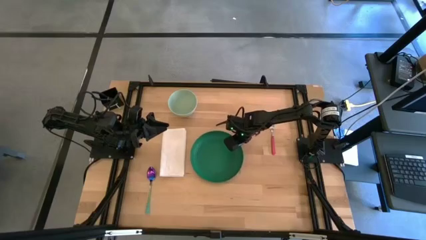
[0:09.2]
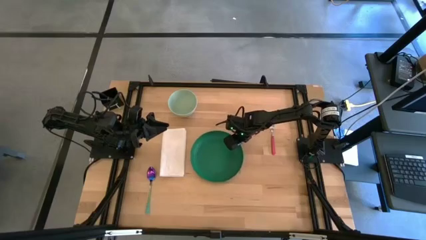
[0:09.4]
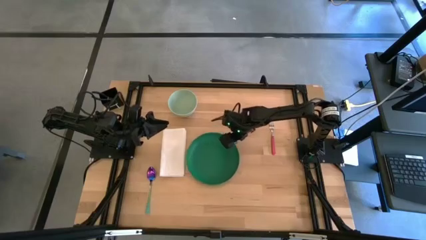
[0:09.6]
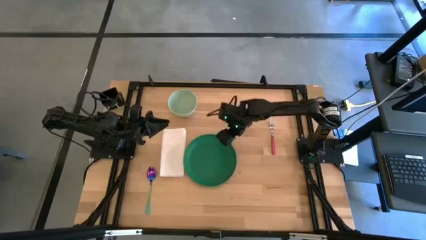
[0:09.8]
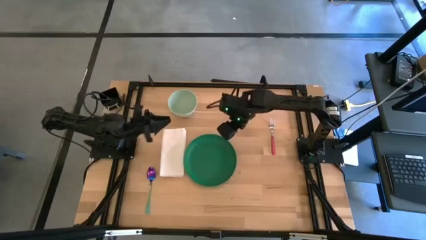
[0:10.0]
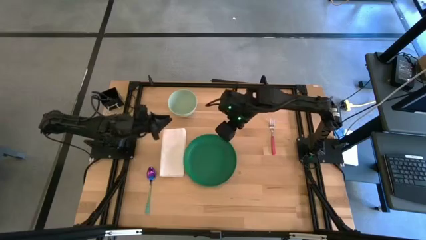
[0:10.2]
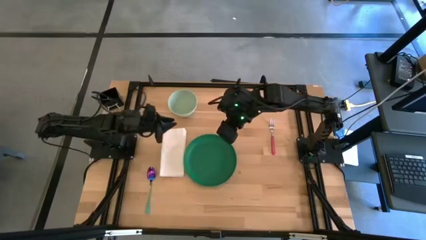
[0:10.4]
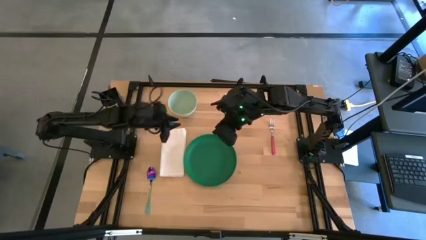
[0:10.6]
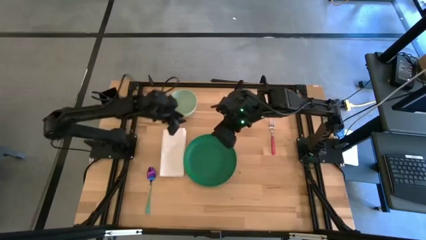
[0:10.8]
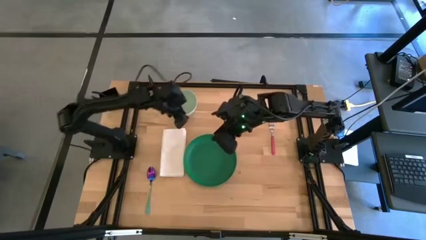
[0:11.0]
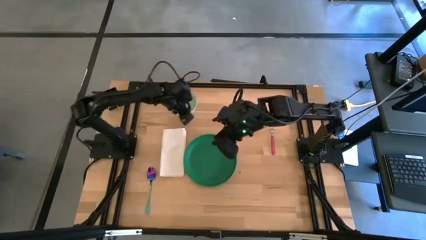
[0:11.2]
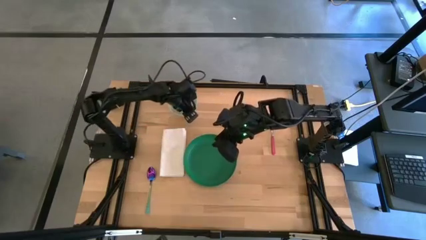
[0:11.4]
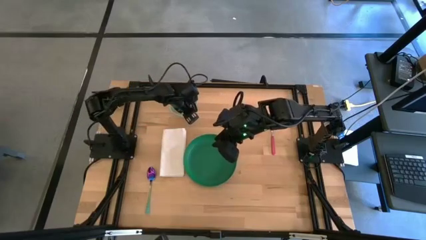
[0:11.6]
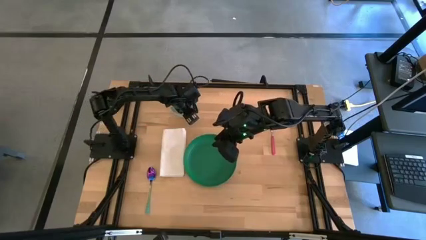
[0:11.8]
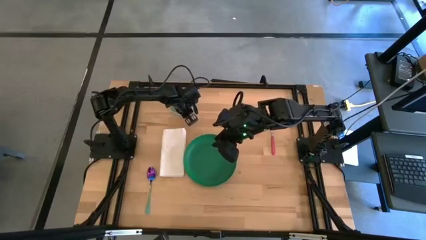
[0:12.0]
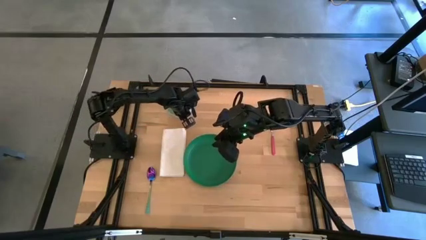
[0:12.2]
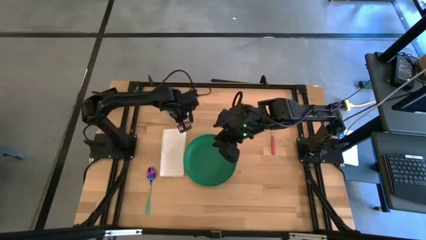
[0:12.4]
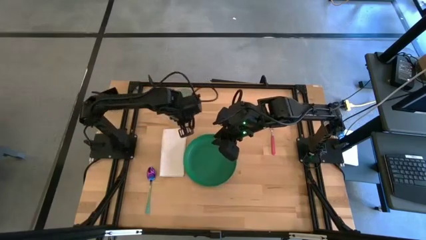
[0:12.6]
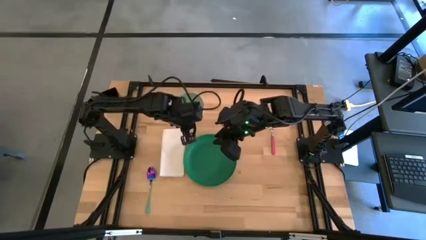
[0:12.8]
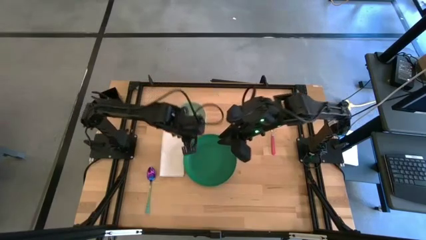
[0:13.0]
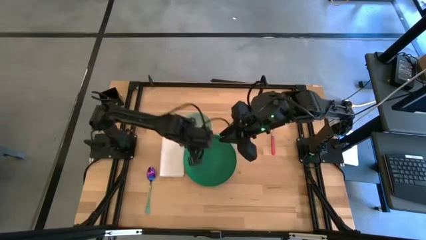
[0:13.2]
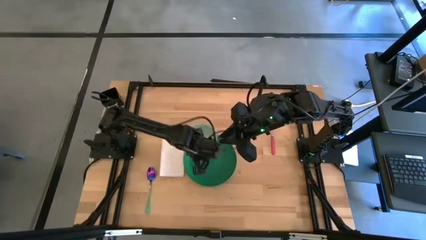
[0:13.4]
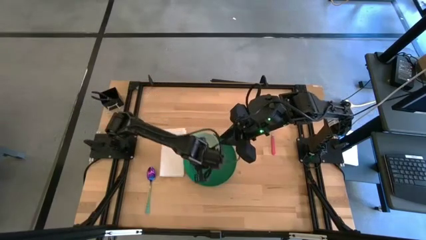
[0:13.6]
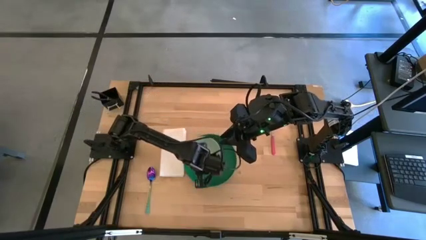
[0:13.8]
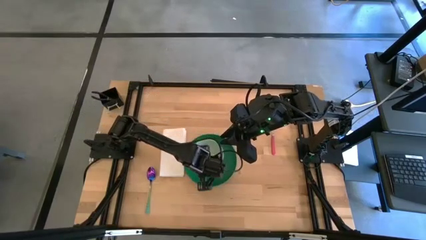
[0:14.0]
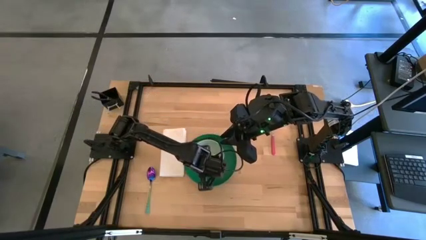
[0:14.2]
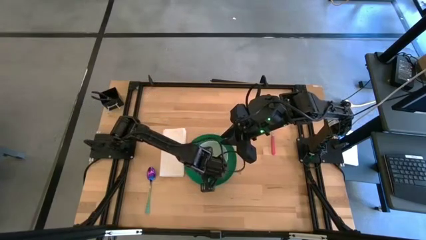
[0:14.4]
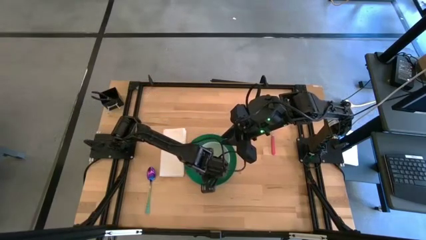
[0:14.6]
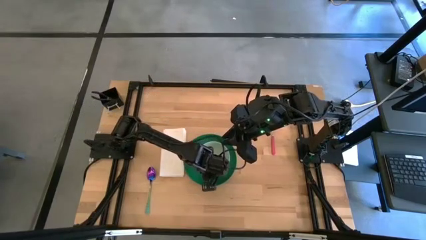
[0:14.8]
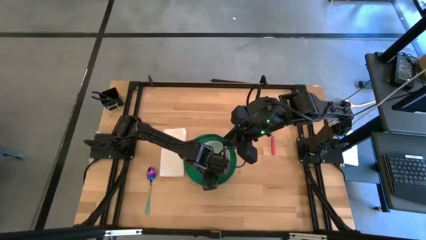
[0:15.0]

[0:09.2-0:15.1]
Task: Set table place
Put the blue bowl on top of the green plate

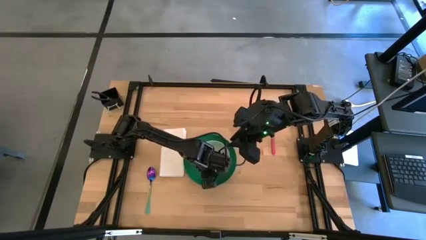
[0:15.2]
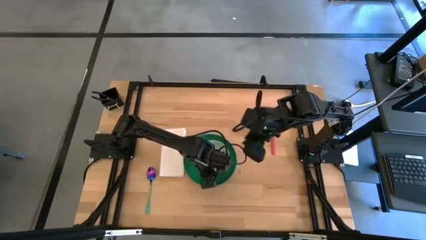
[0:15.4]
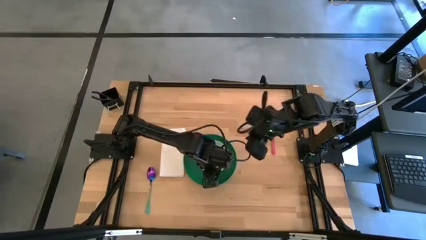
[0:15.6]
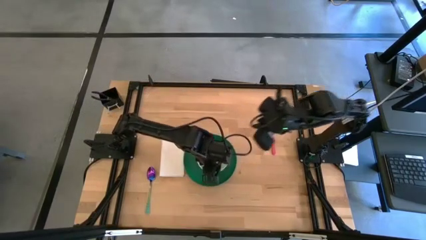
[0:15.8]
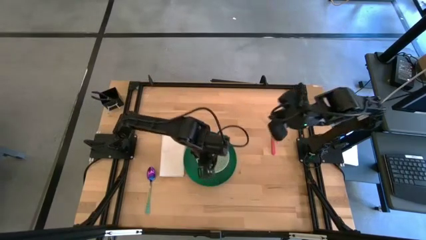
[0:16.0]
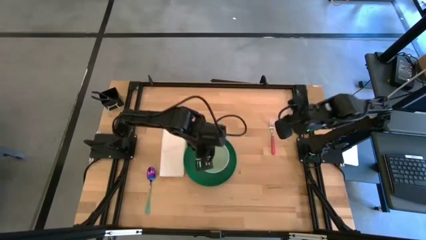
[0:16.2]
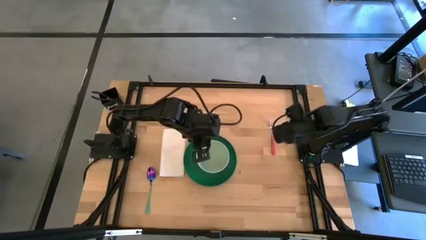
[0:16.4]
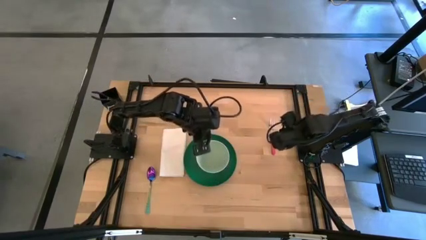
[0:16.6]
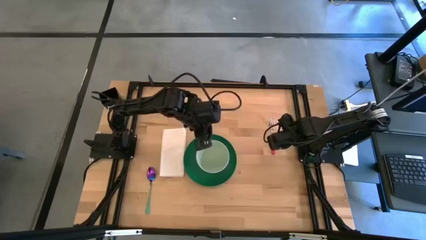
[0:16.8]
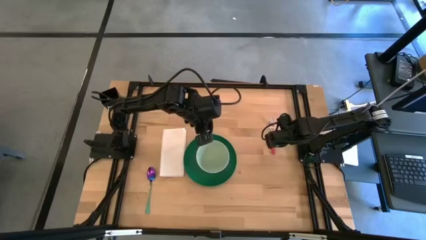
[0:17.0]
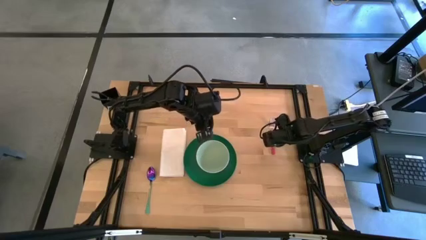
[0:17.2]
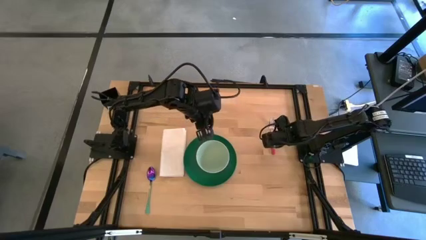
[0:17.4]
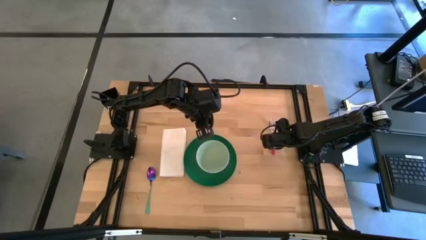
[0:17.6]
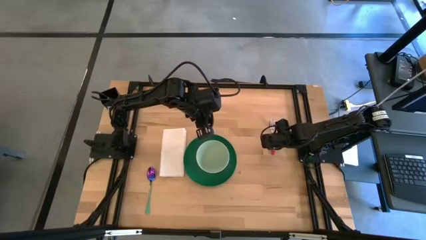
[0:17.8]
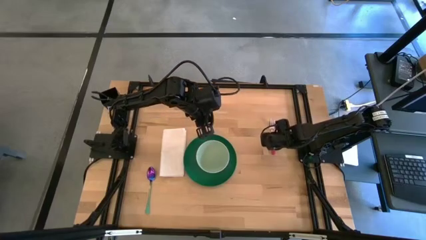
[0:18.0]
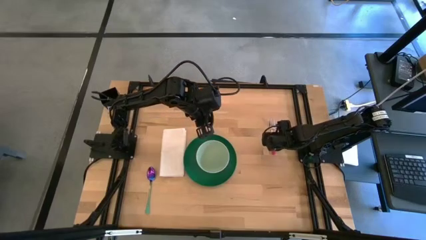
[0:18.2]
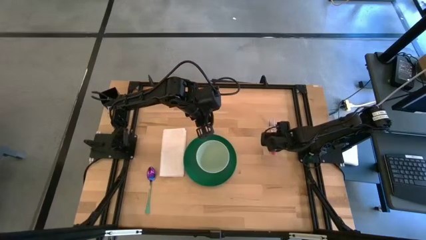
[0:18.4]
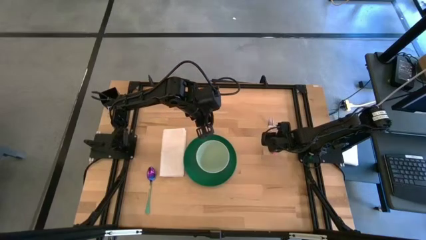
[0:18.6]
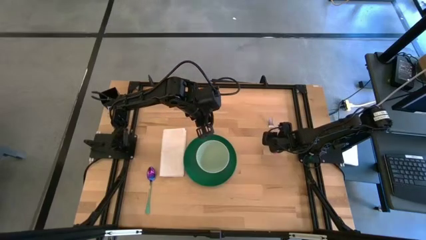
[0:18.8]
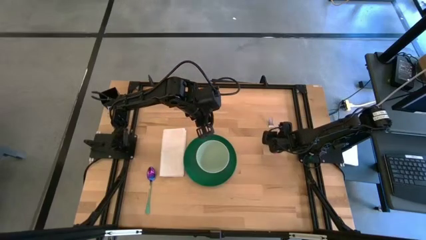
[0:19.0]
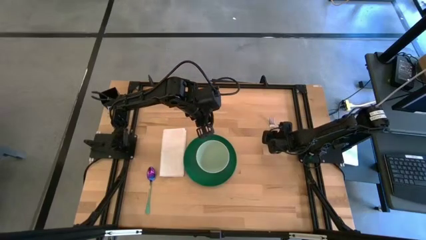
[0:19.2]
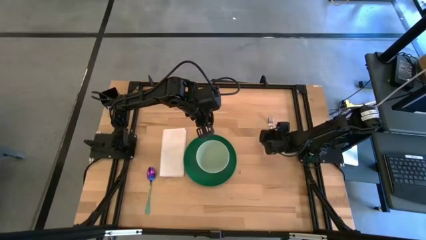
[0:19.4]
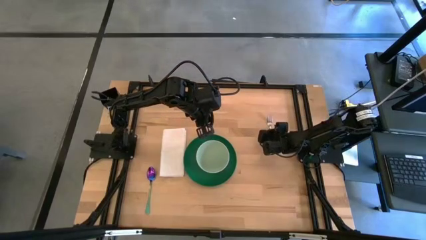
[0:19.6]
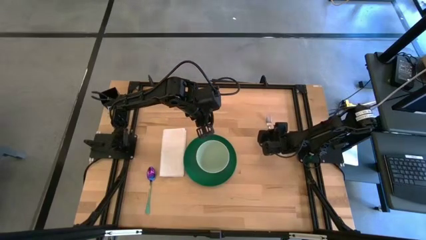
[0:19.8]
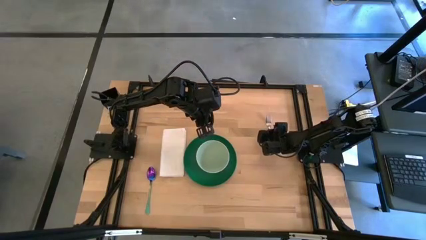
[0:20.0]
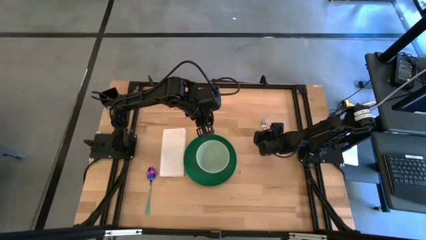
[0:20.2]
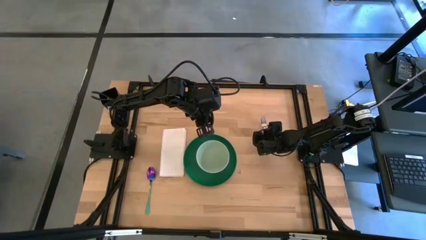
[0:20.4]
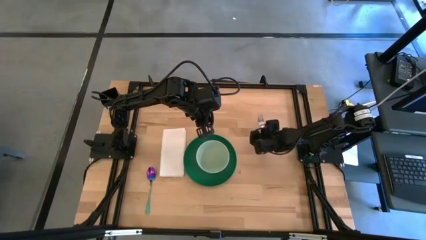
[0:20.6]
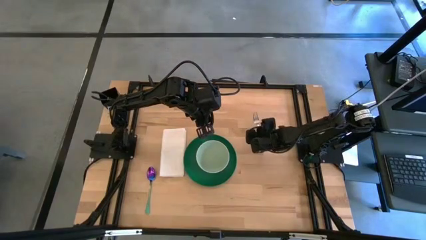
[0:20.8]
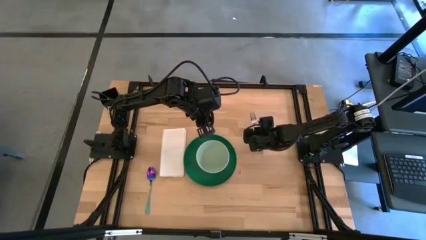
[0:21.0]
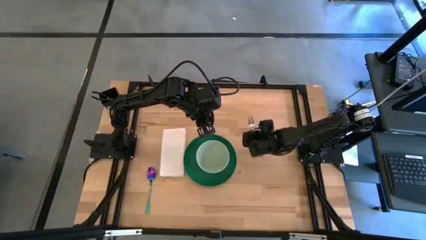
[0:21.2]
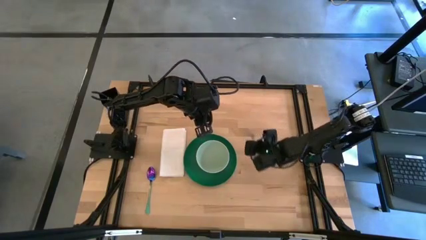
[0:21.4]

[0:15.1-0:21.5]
Move the pink fork beside the green plate

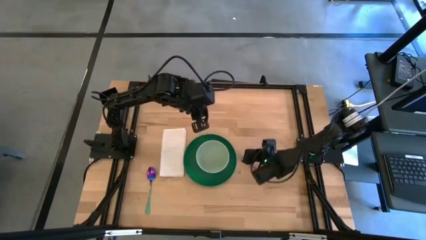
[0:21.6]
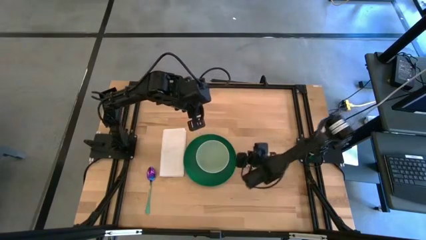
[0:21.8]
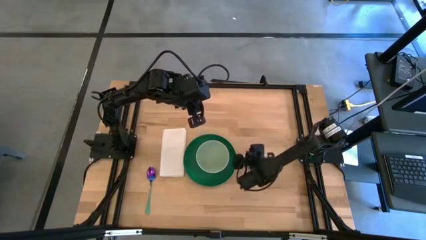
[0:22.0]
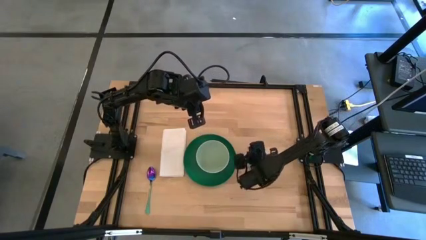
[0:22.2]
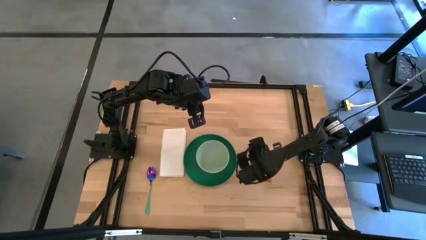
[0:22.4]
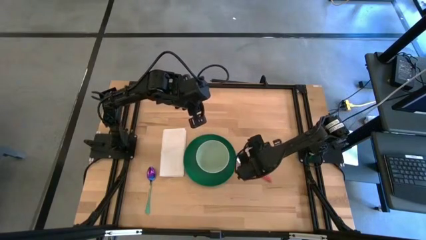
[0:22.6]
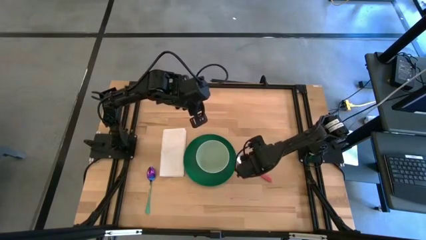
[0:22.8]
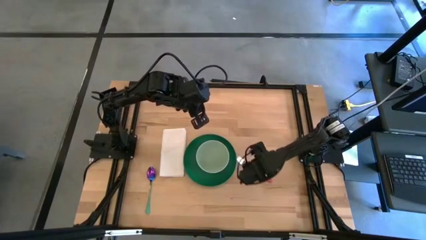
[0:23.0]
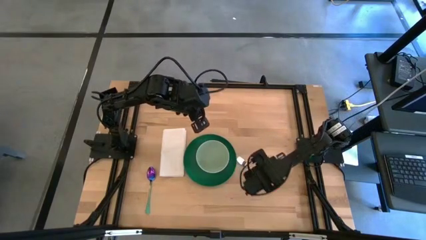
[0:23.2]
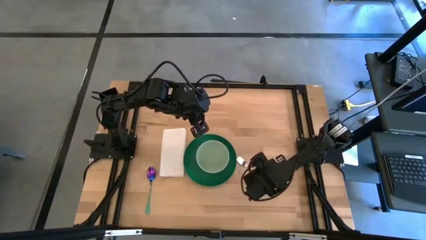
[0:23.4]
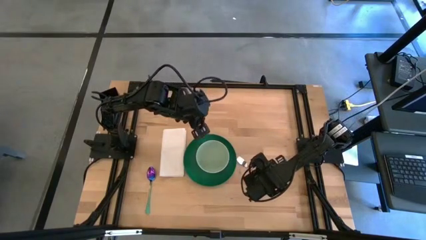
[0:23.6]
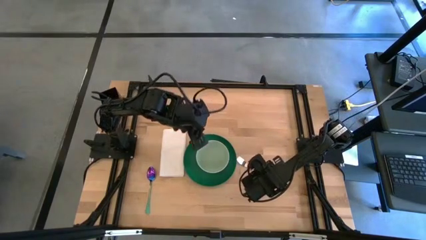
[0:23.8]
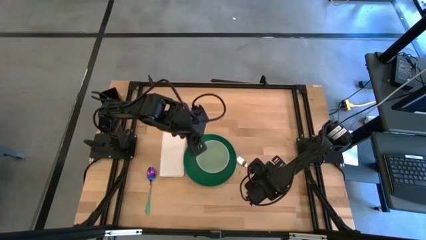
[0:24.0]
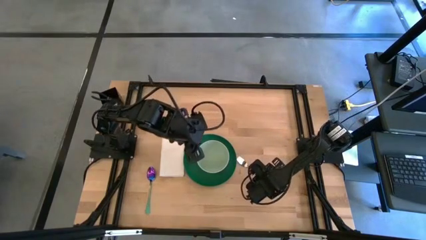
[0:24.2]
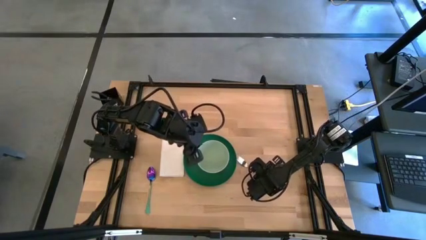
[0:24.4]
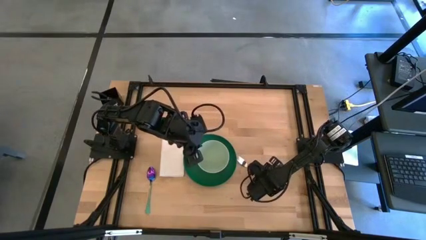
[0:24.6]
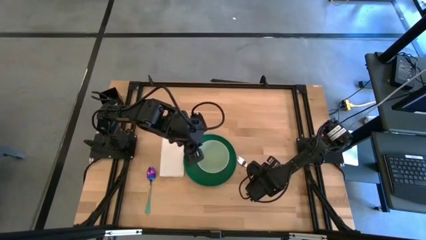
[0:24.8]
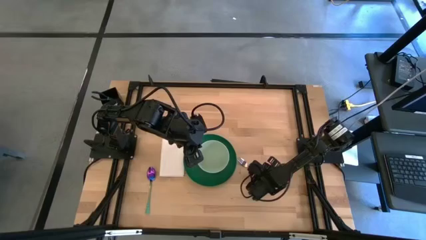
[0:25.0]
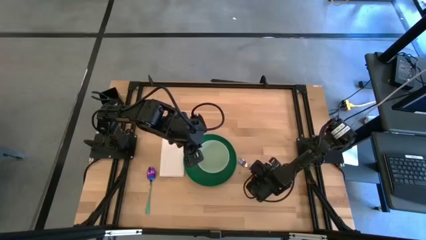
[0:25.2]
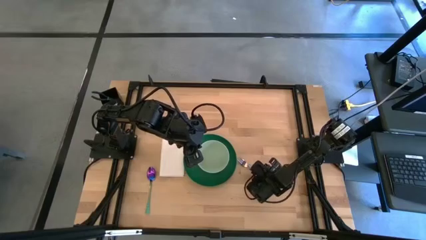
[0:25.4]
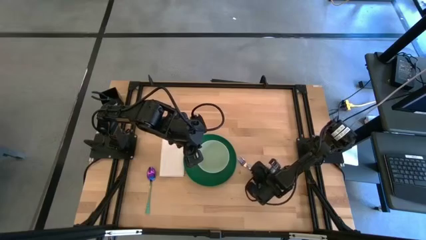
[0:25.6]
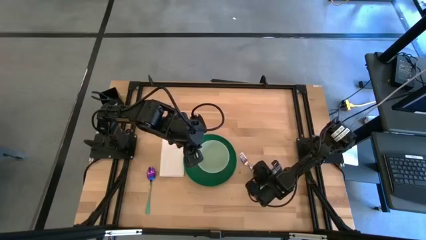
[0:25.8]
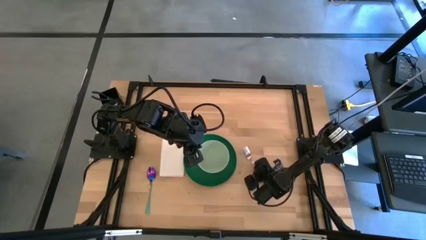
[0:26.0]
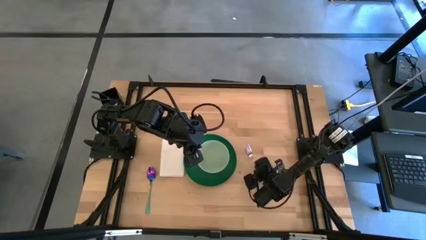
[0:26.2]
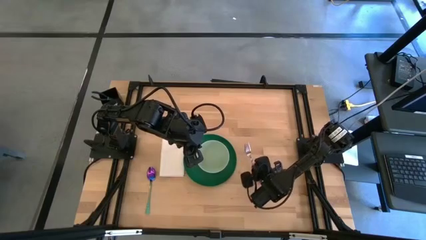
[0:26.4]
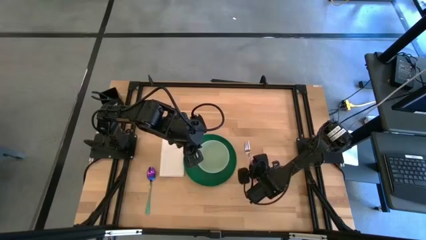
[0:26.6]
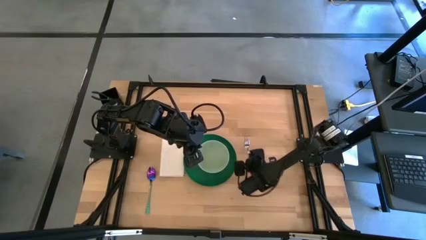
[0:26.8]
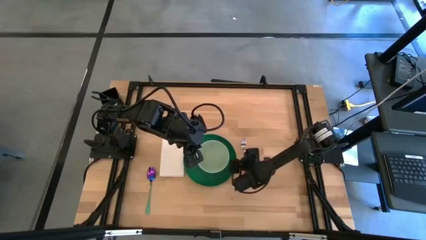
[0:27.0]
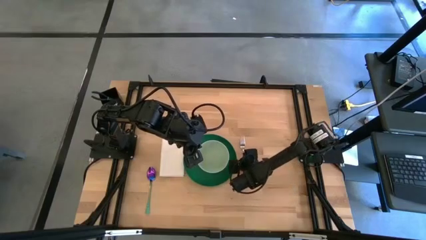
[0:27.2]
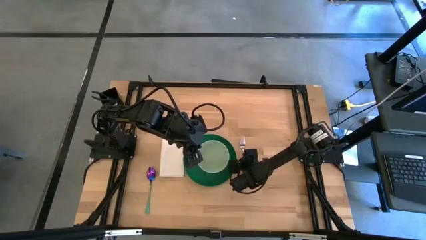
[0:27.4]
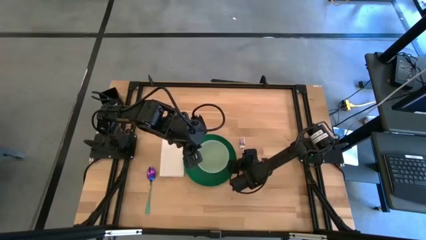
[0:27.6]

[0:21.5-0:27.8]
Move the pink fork beside the green plate
